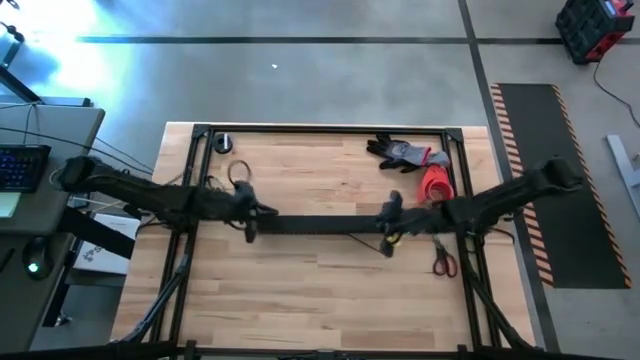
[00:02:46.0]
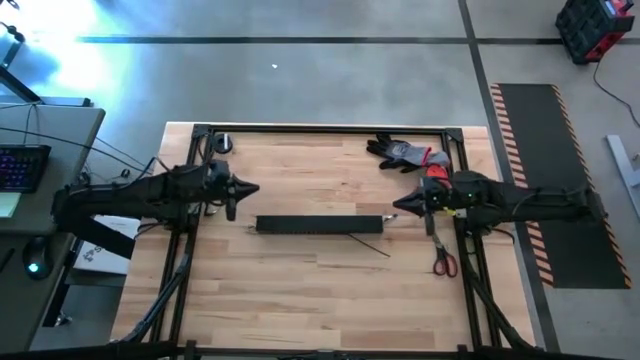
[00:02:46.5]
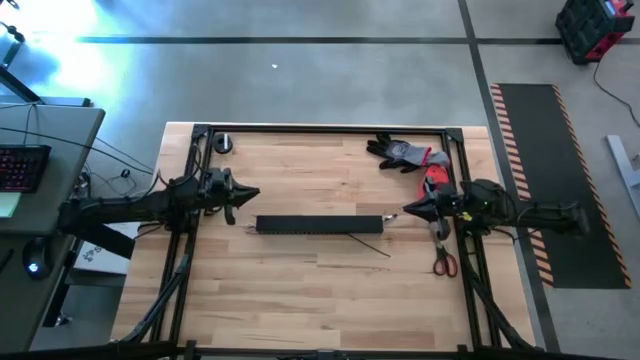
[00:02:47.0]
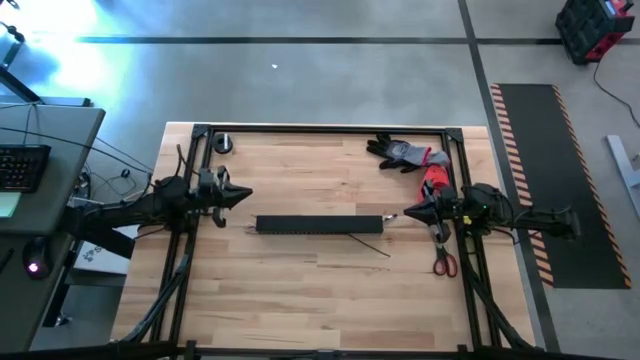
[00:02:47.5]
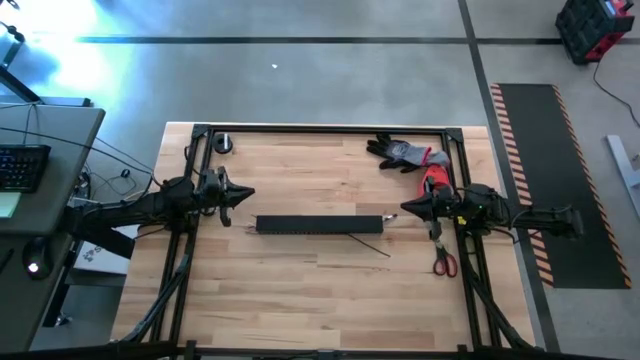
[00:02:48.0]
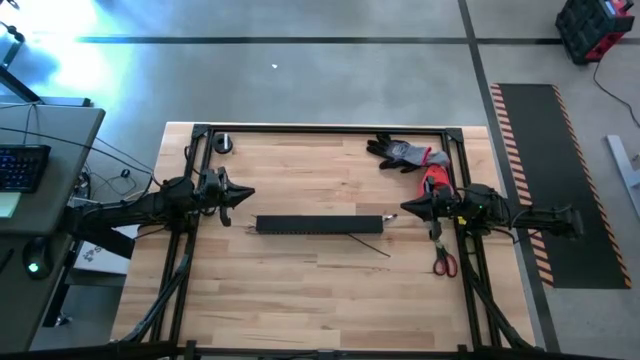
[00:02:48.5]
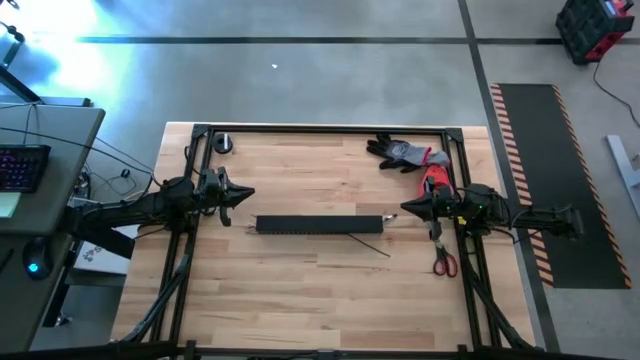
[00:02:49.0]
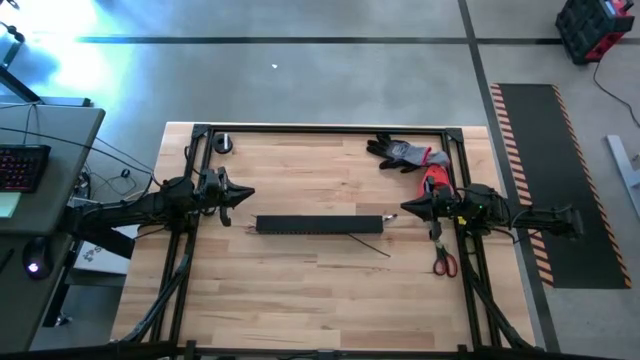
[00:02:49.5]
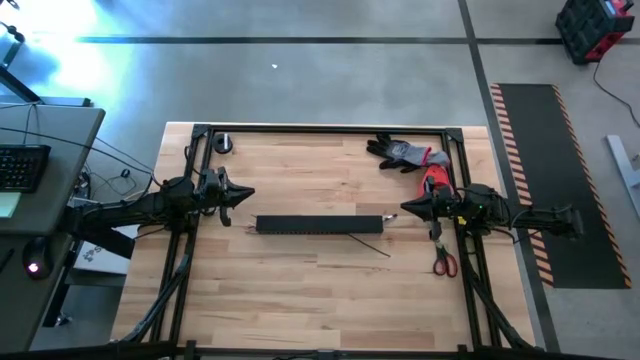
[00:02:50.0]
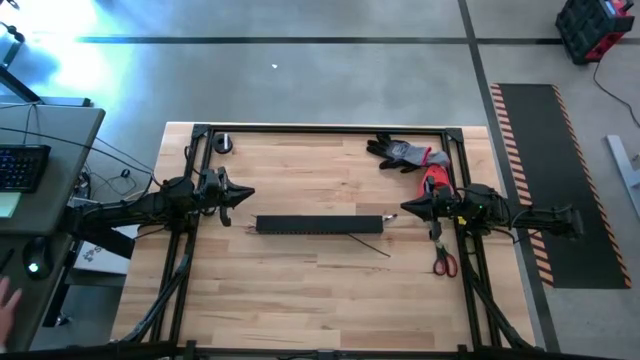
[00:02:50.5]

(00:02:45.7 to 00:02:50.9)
Task: Ziptie cables
Return to Home Position

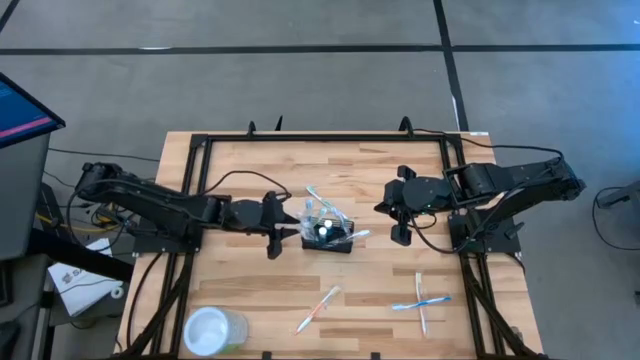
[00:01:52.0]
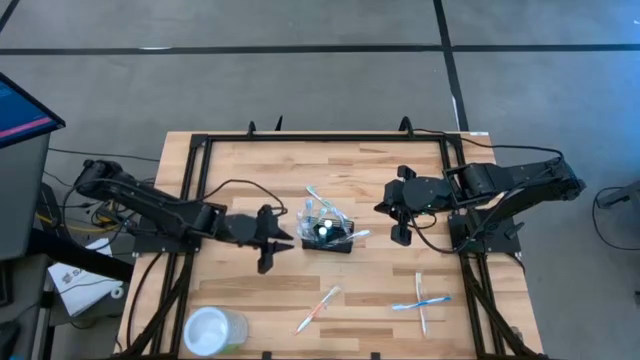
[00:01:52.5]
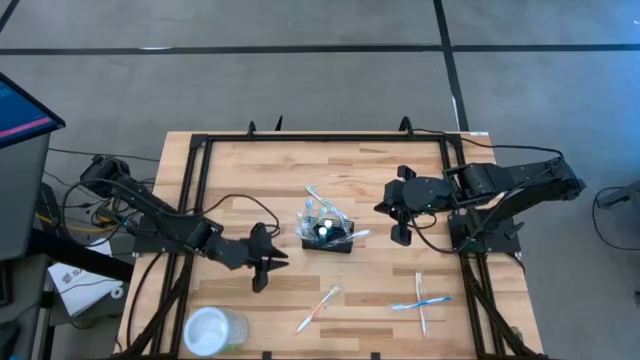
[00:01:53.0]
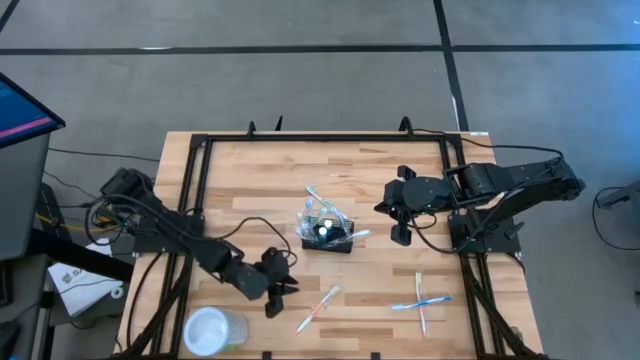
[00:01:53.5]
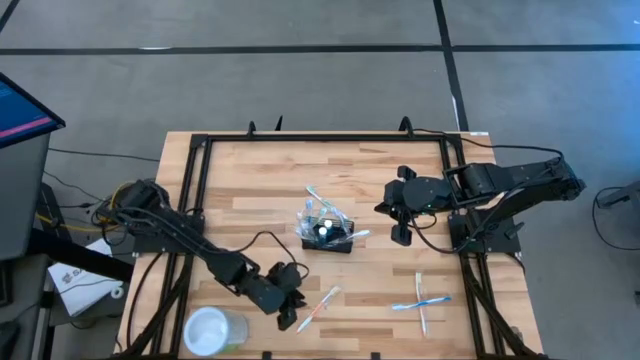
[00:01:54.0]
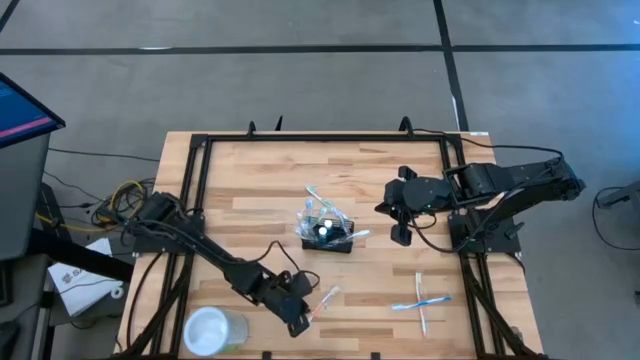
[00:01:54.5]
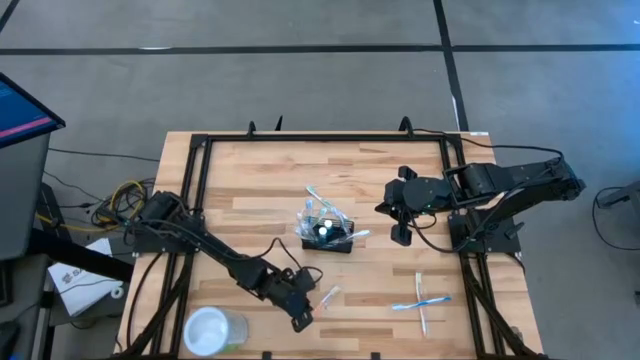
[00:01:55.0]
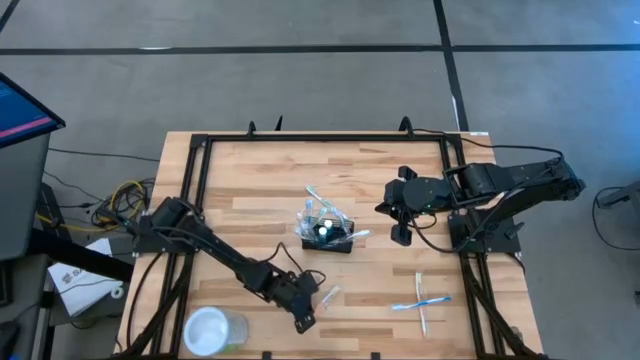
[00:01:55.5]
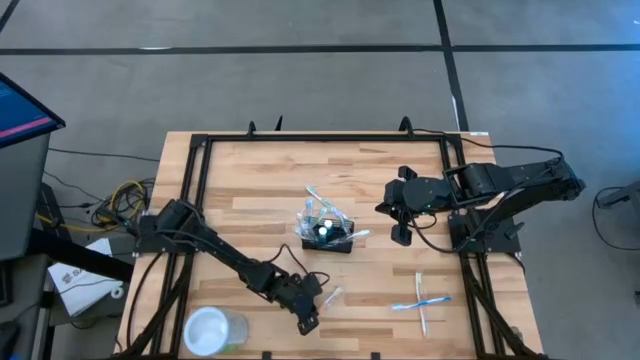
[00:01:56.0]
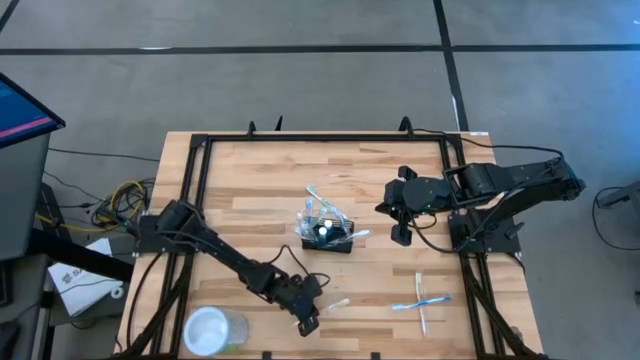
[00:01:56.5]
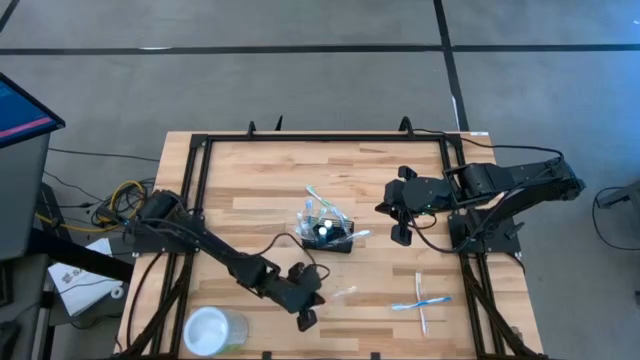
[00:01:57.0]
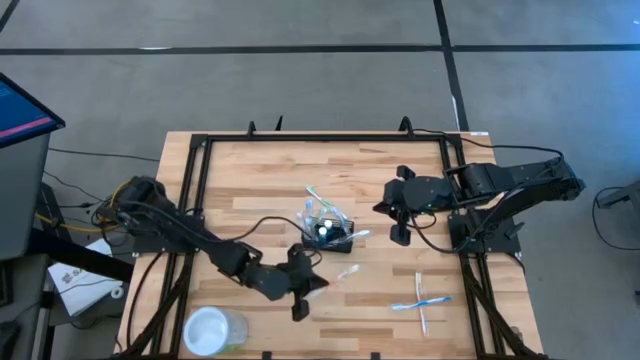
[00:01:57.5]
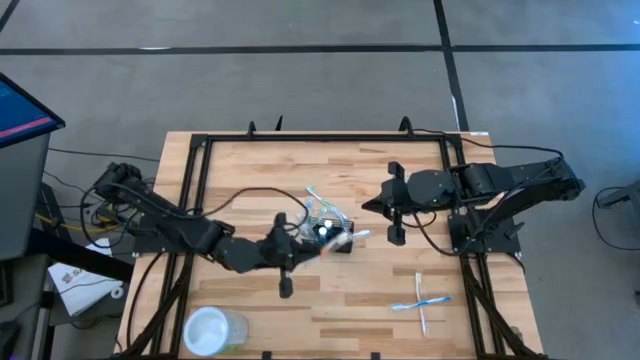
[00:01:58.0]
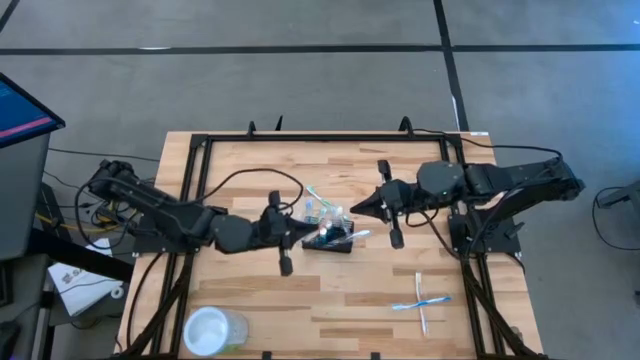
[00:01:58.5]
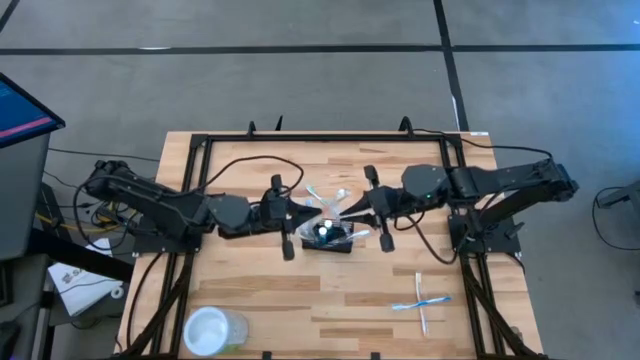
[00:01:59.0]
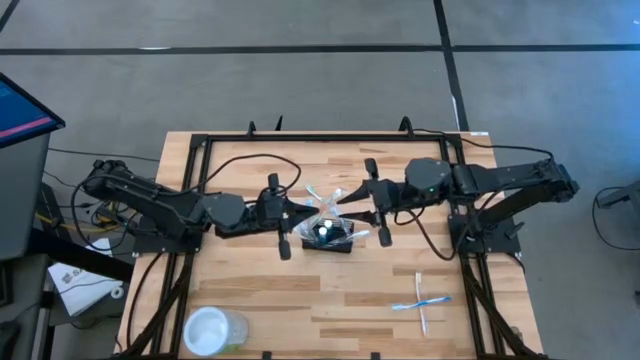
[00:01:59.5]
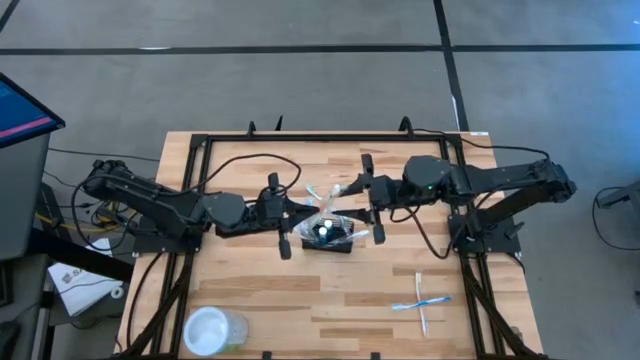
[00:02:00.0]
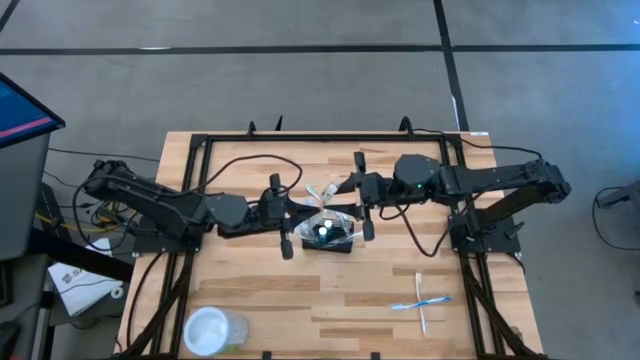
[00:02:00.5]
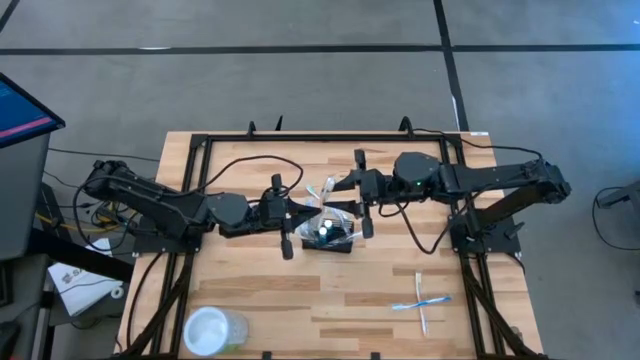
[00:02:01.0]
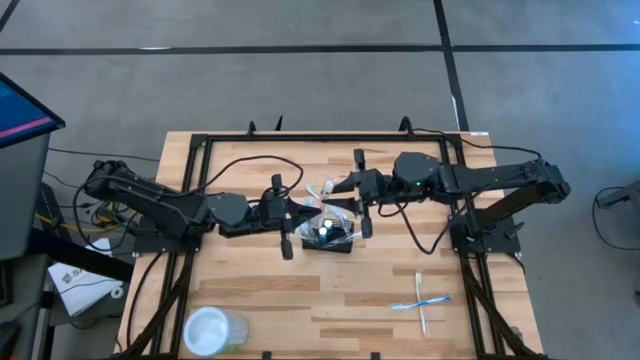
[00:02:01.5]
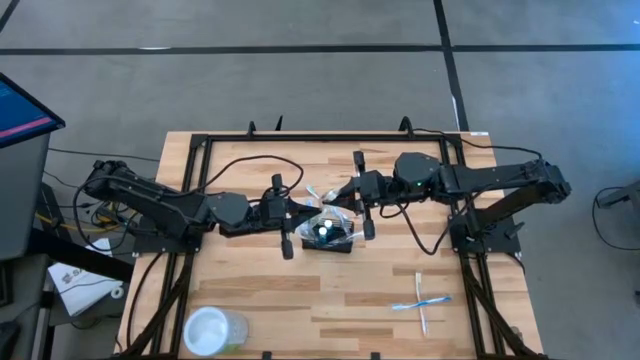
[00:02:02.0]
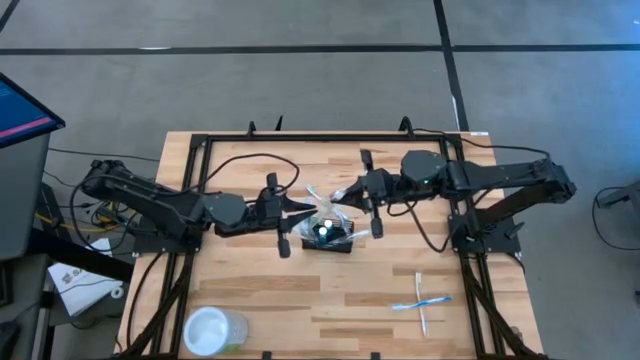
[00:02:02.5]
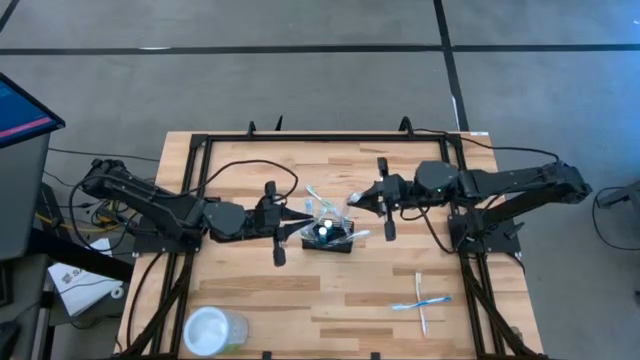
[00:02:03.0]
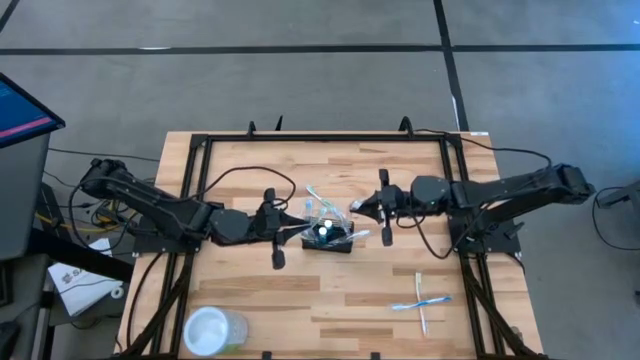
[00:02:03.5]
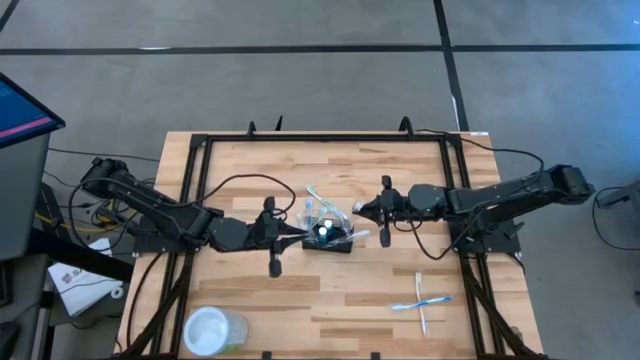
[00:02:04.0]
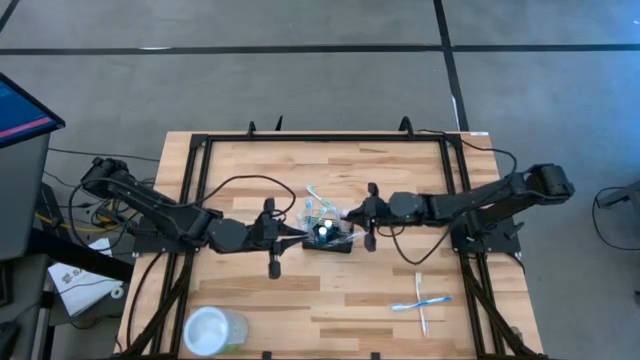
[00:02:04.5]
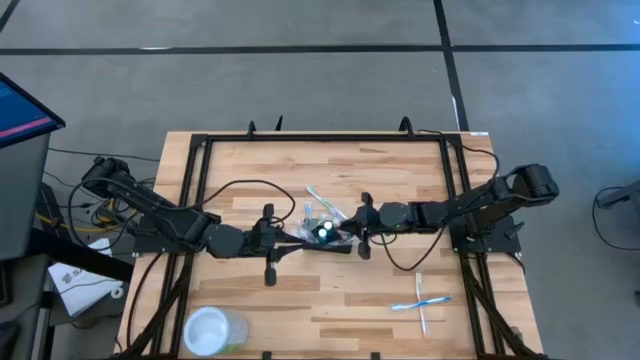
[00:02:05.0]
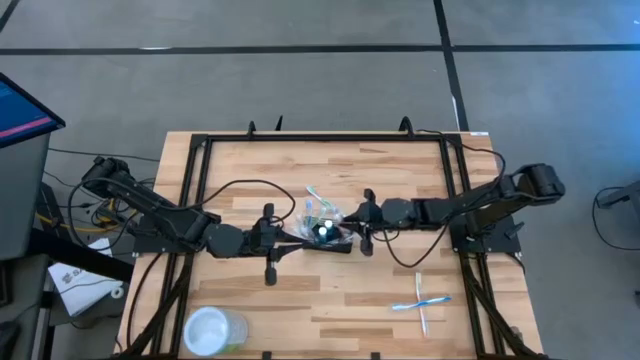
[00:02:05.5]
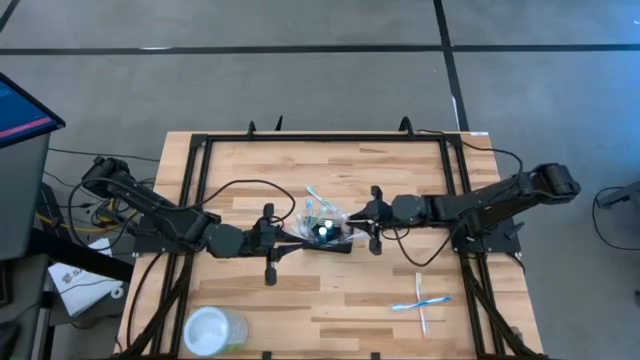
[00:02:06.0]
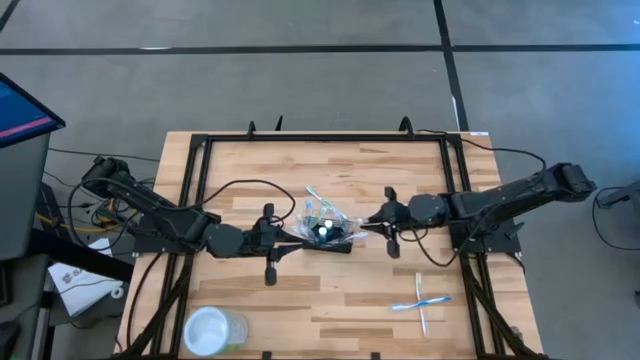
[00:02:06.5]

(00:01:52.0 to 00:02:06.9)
Task: Pick & Place toothbrushing station
Put the left orange toothbrush into the wire organizer
